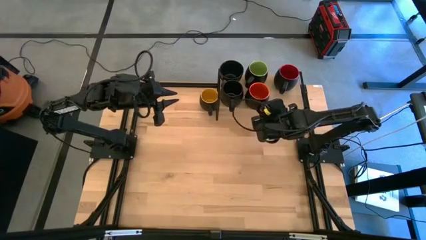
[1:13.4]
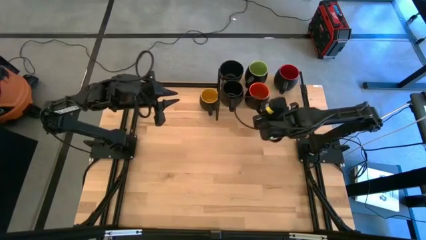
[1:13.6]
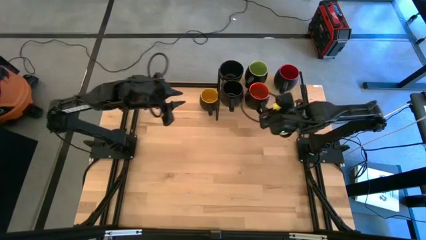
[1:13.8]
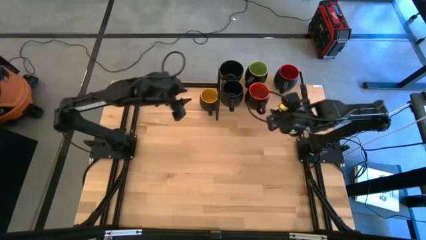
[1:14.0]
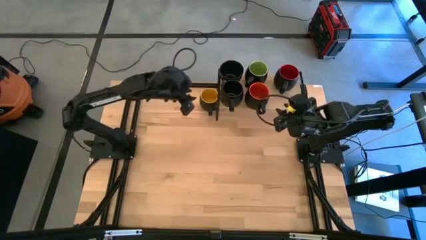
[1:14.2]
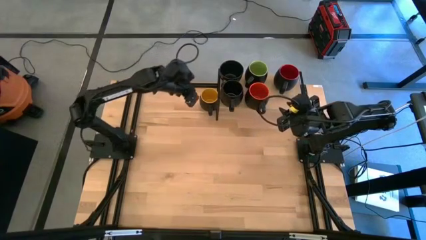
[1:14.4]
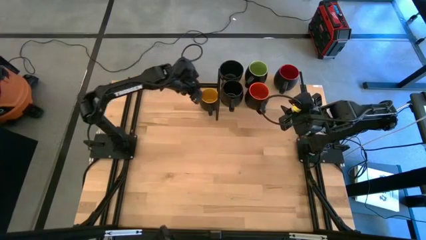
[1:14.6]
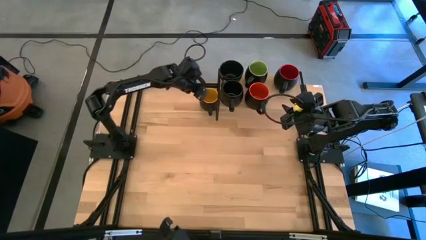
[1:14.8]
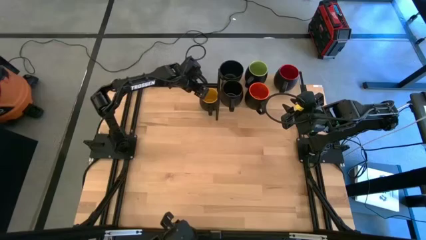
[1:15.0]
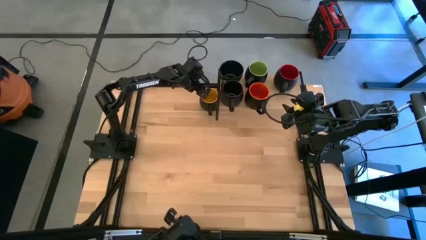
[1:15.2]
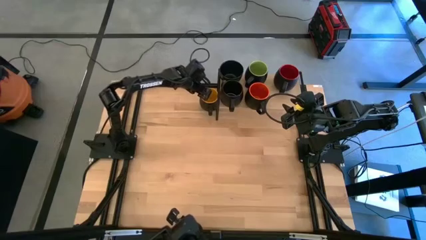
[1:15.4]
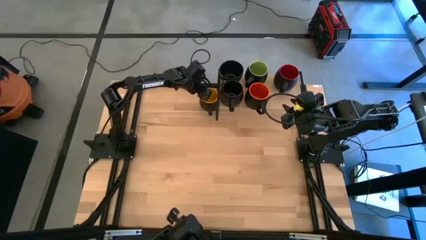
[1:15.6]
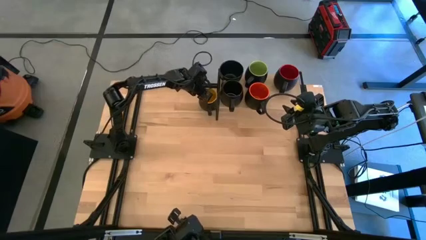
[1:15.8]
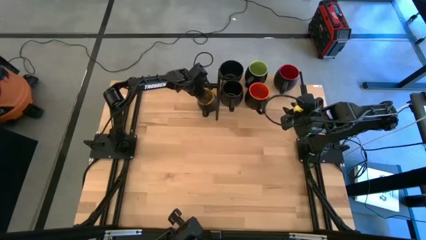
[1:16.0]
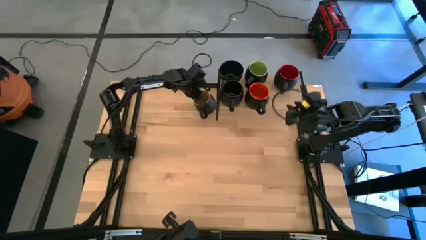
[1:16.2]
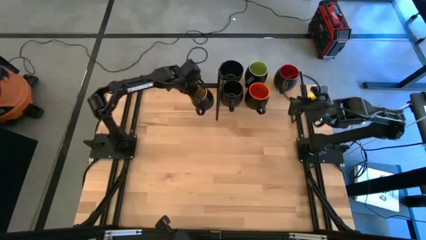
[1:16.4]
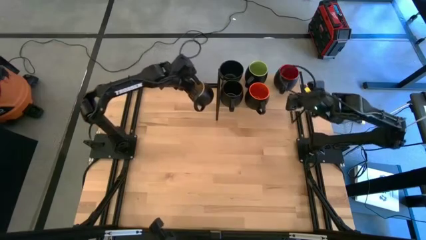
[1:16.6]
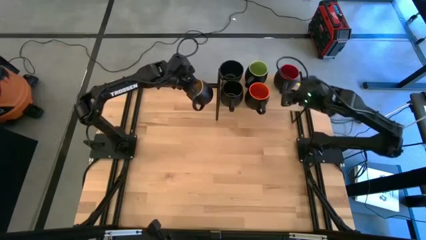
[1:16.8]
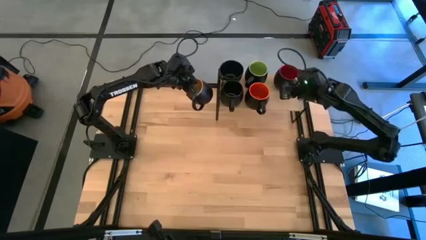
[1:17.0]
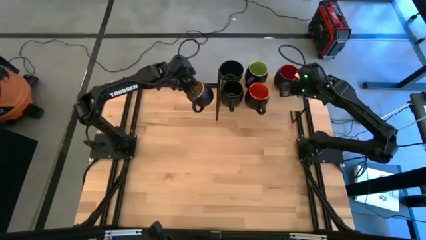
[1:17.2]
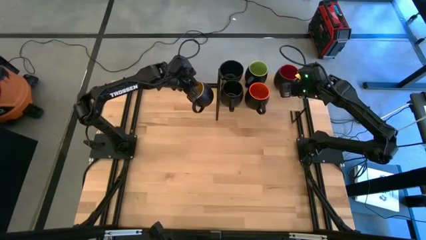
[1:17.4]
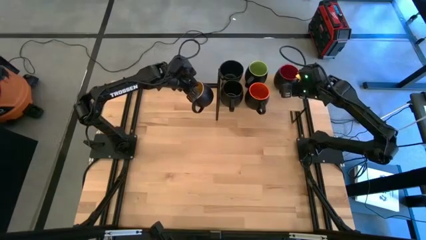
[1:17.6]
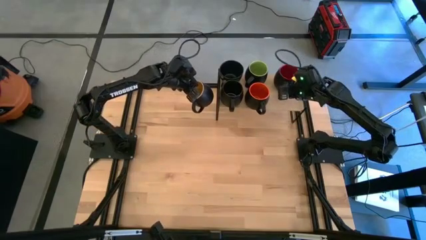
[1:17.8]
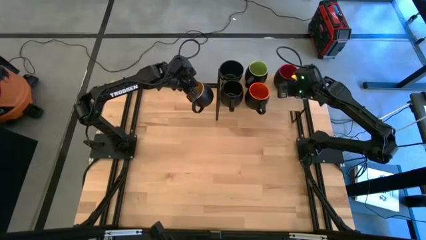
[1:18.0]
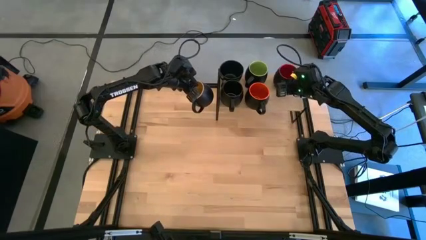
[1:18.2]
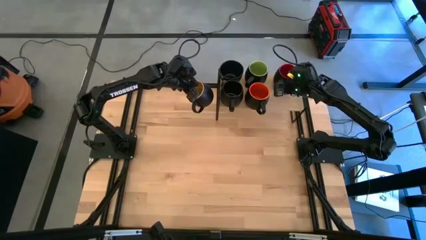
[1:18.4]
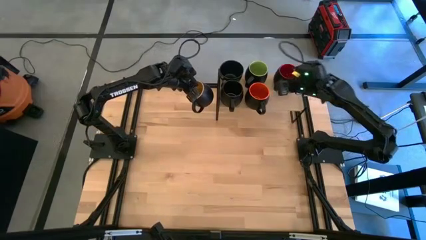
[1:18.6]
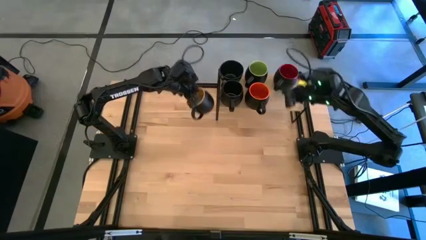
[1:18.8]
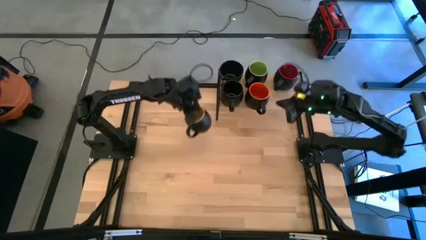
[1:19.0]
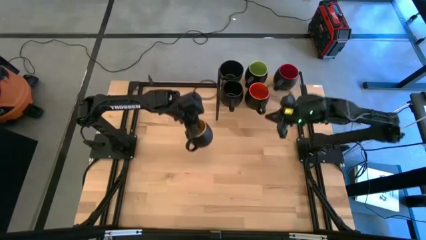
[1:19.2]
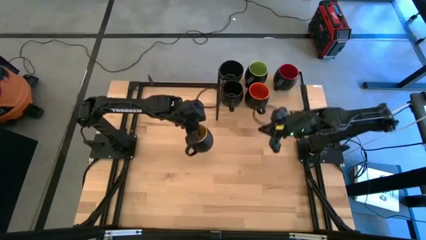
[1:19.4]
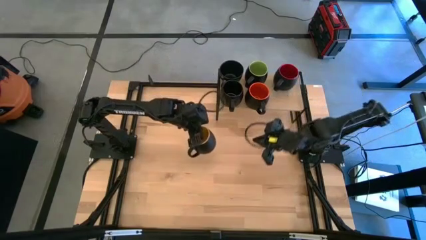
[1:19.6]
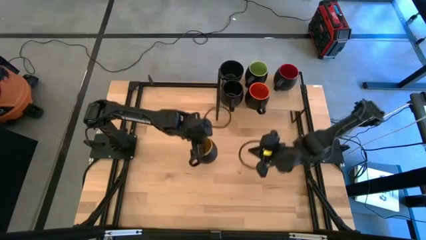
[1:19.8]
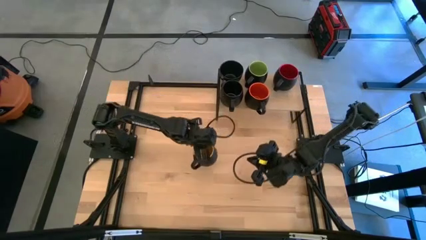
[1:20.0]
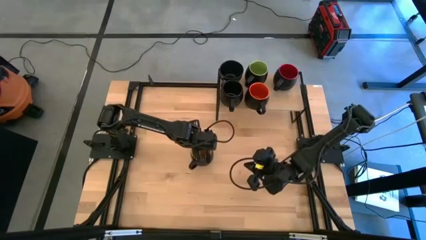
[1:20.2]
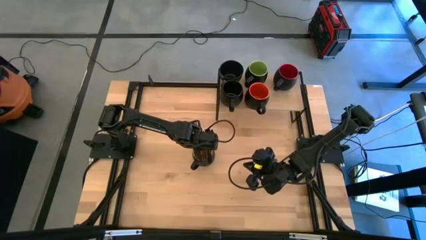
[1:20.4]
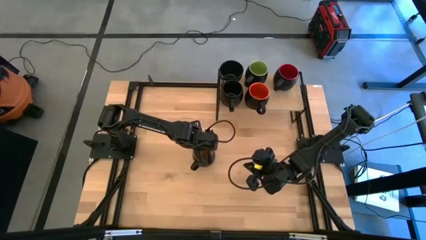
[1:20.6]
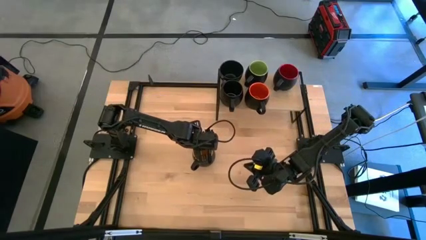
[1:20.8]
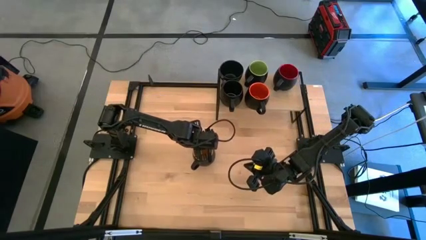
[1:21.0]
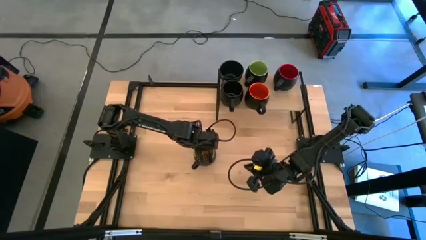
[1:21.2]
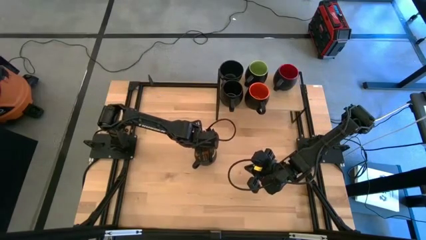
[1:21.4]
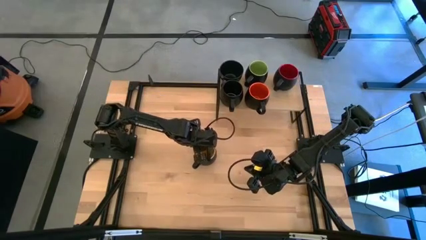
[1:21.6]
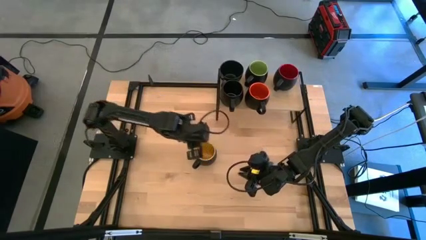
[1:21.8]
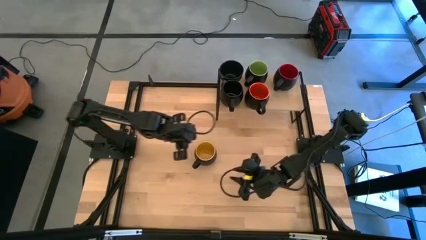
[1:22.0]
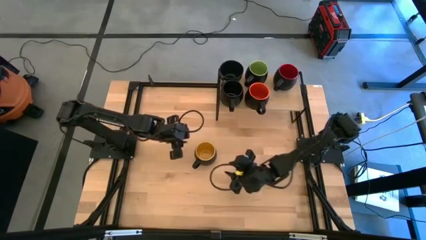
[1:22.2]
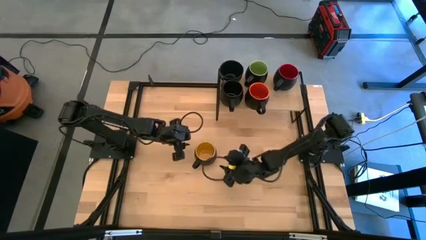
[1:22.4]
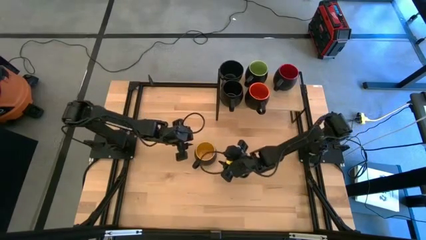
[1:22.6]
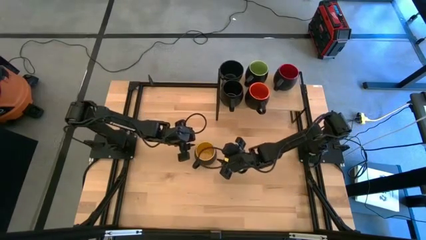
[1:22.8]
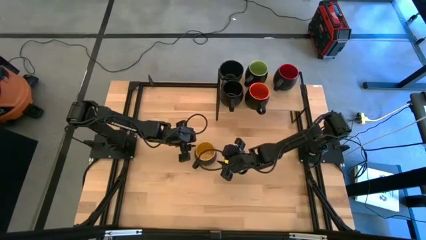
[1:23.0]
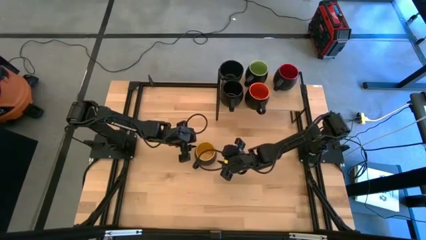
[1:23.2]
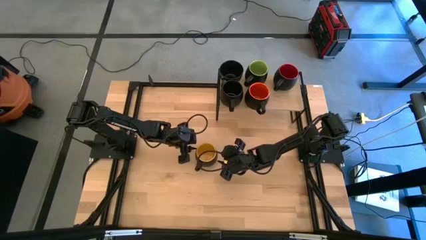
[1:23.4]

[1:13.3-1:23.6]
Task: Place coffee mugs
Put the black yellow mug on the shelf
